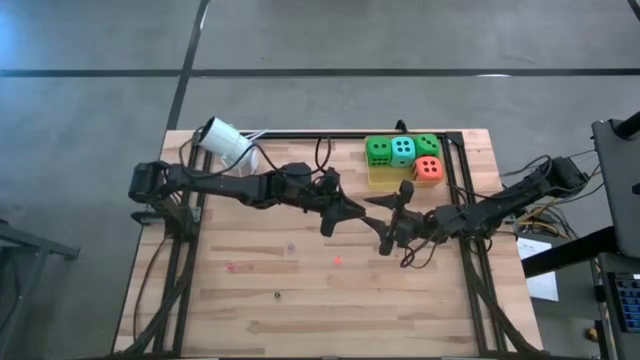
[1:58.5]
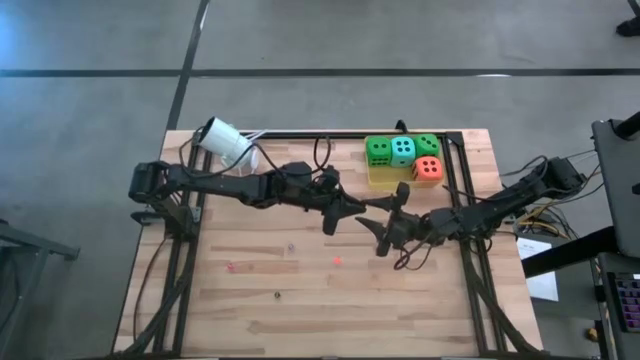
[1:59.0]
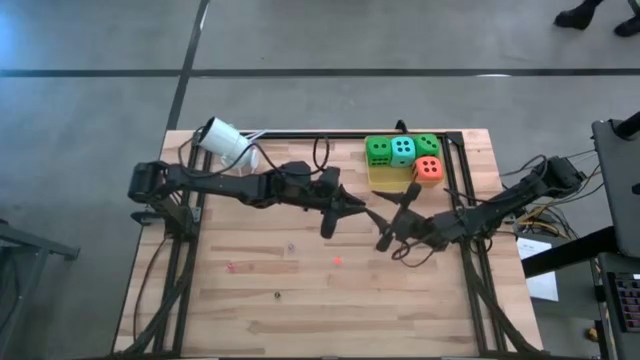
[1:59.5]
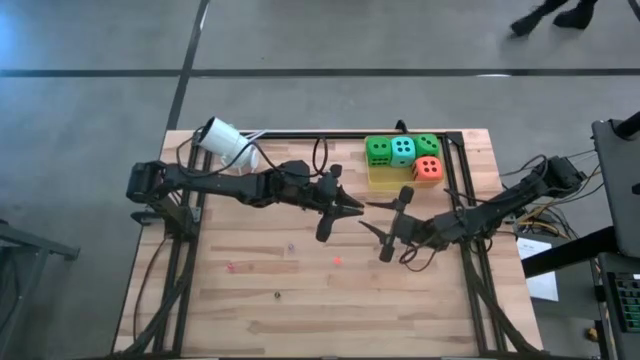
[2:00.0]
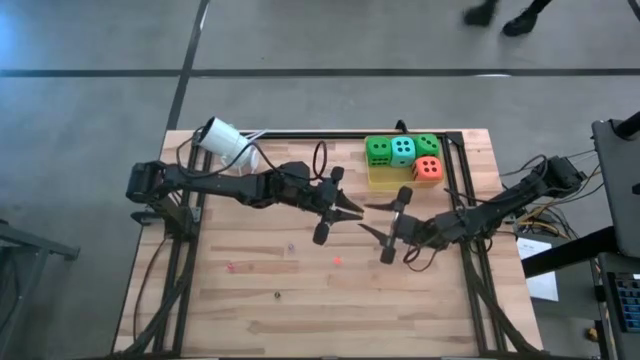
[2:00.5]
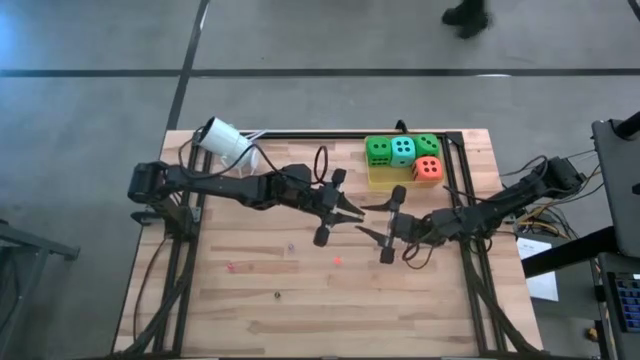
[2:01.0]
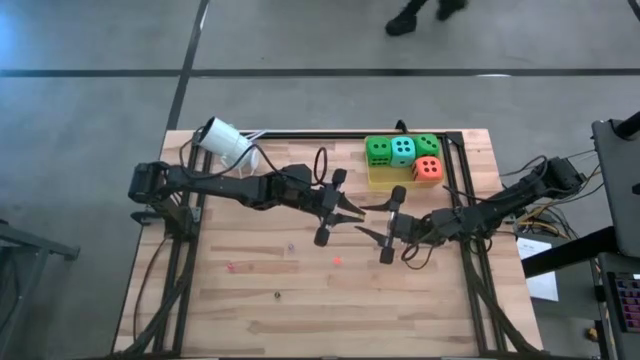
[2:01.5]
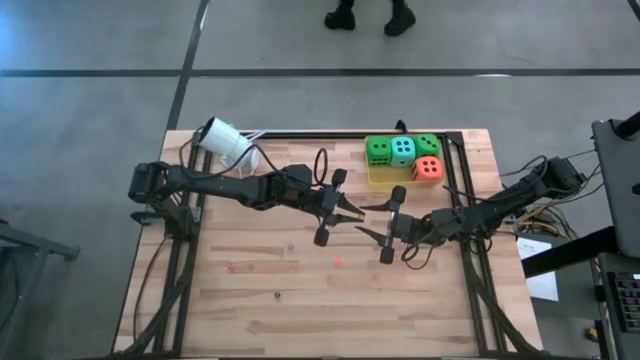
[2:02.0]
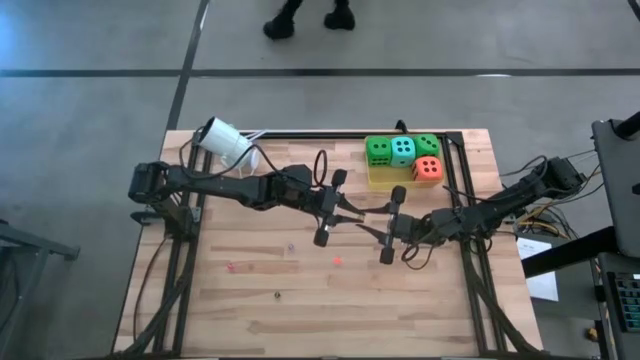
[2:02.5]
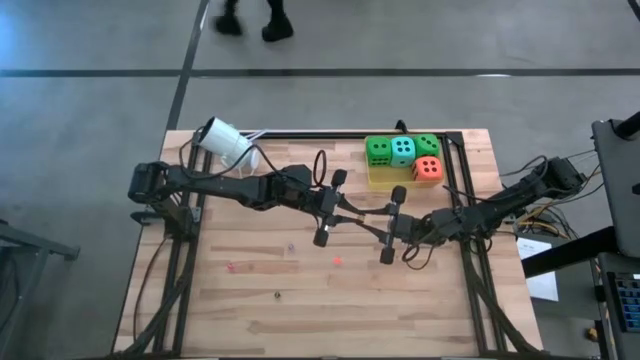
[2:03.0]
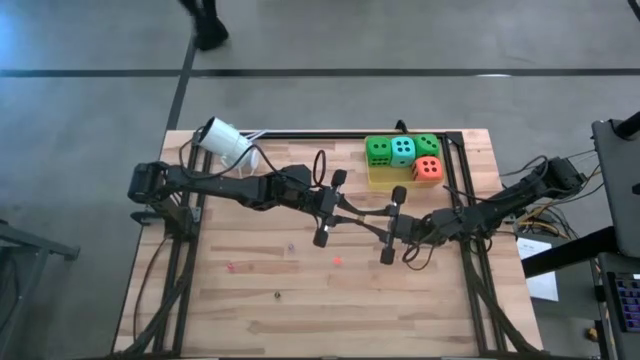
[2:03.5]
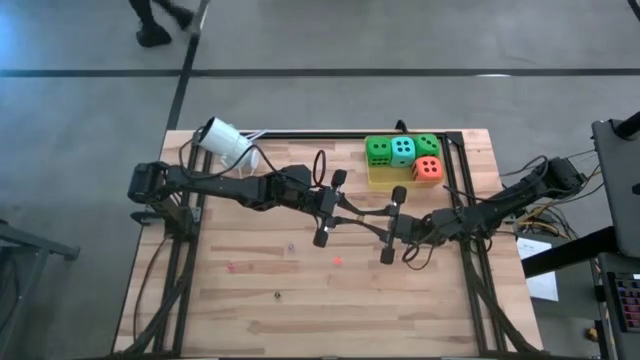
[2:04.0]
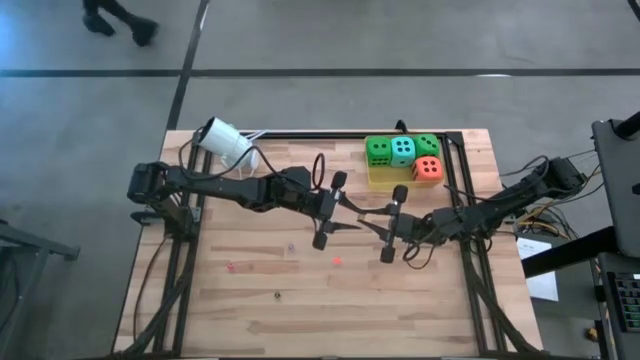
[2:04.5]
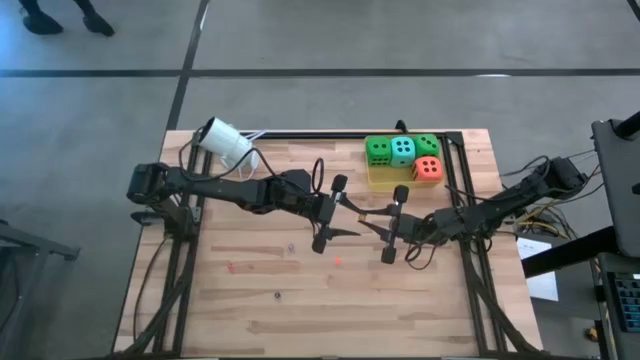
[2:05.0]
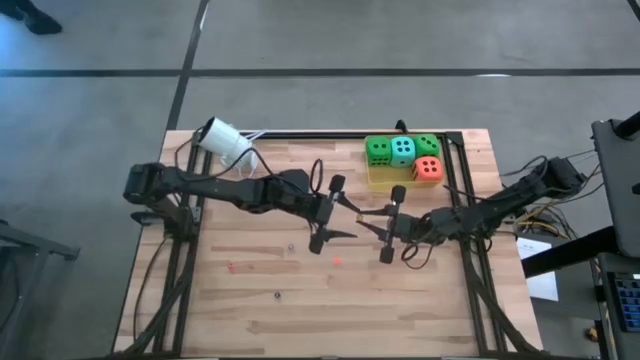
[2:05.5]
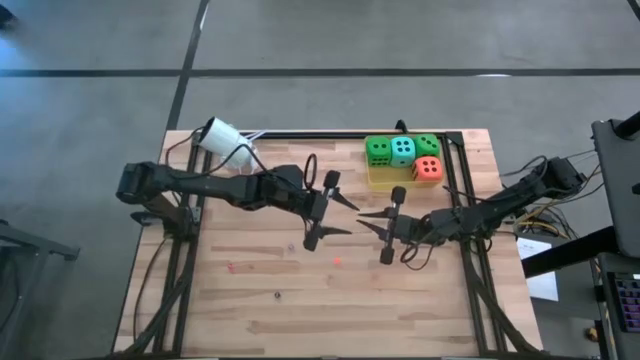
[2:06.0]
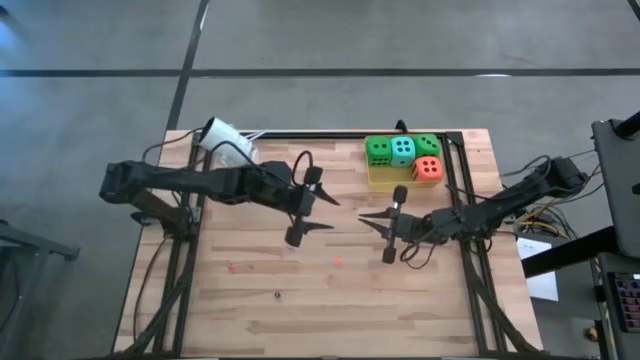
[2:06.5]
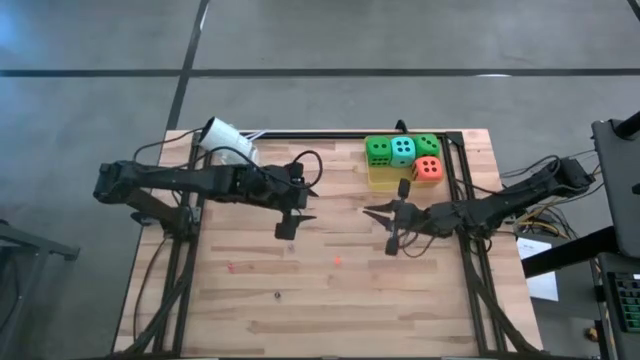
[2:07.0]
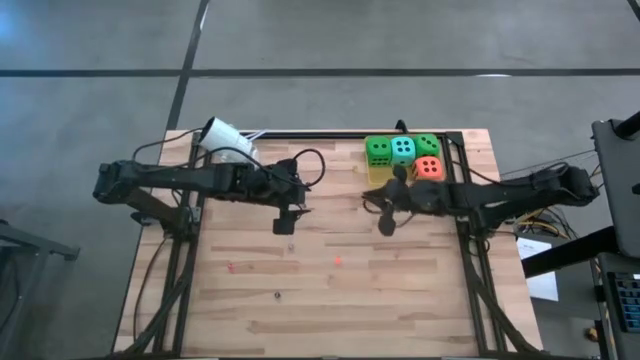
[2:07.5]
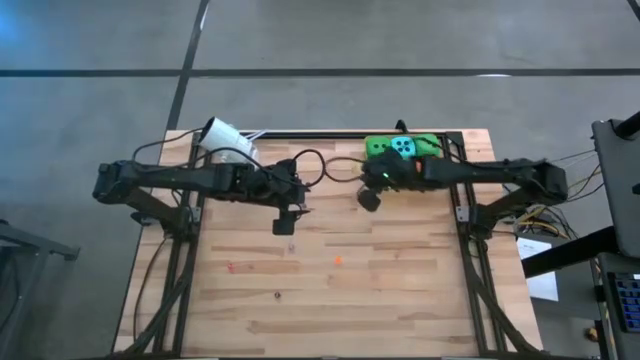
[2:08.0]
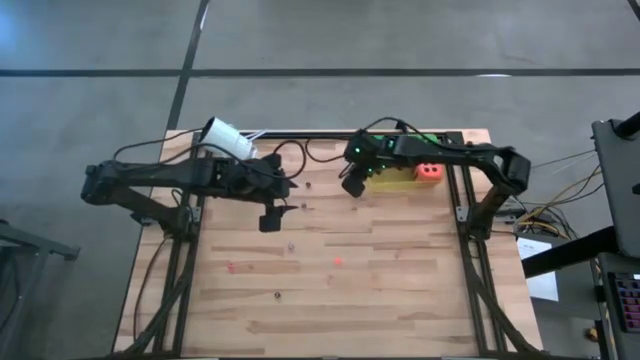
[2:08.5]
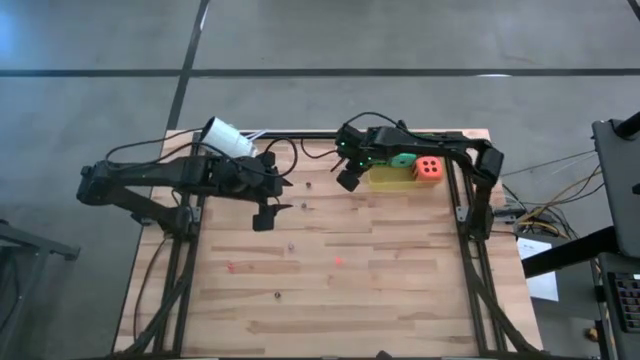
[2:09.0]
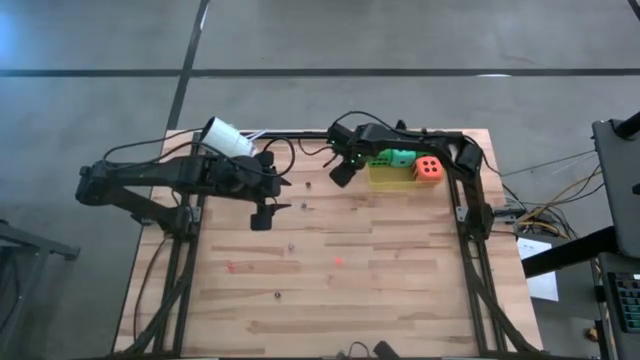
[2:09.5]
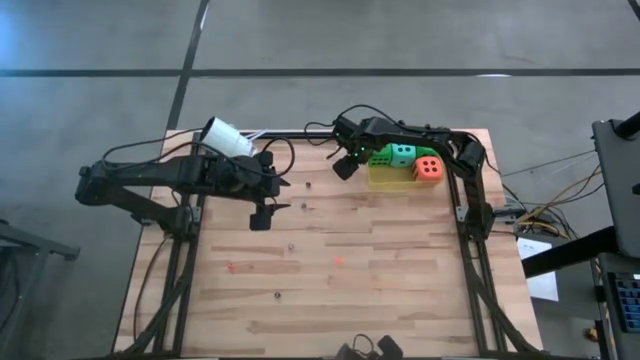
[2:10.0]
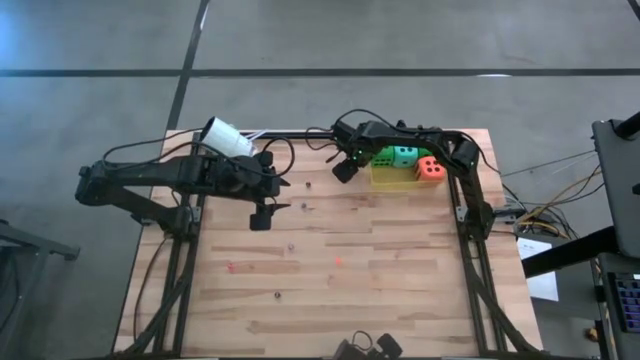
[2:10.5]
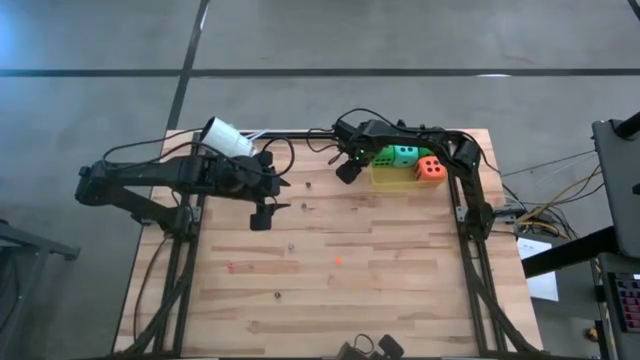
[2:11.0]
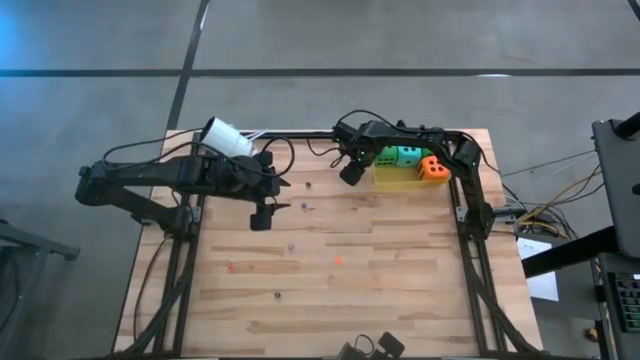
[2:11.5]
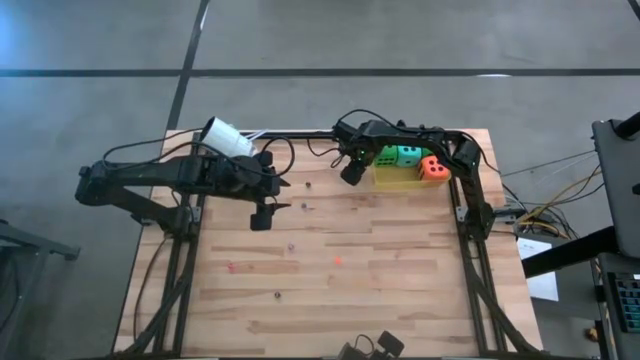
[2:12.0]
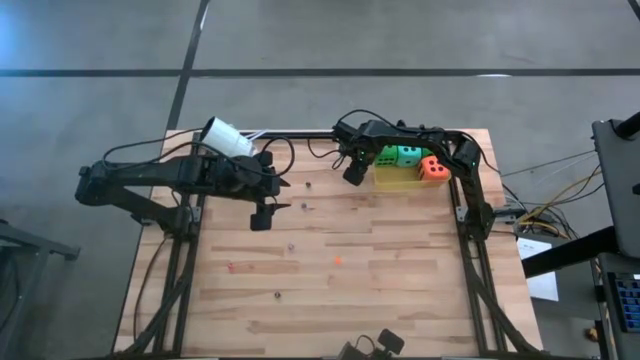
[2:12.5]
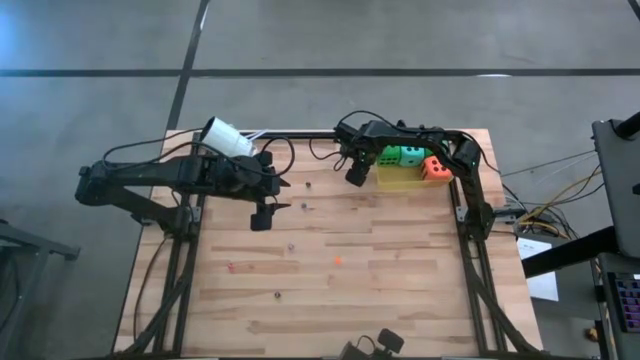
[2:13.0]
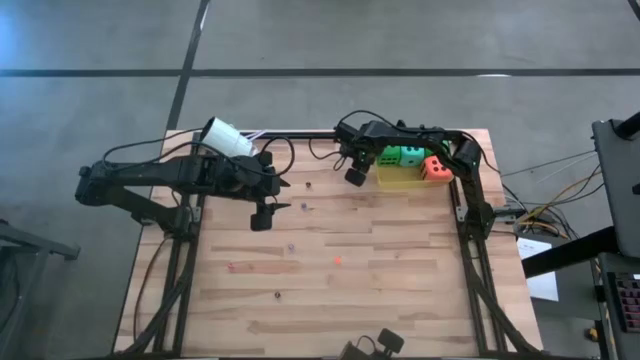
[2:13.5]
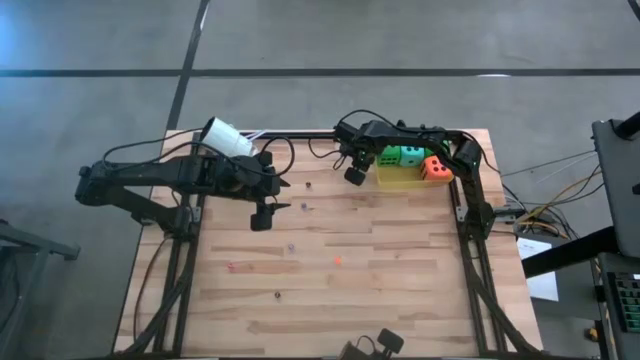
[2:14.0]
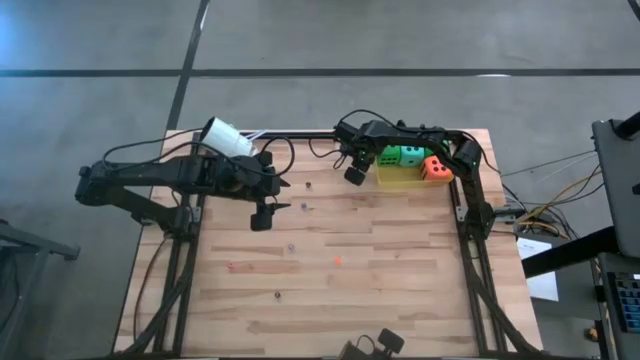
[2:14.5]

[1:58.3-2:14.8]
Task: Pick & Place Dice
Put the small yellow dice into the yellow bin

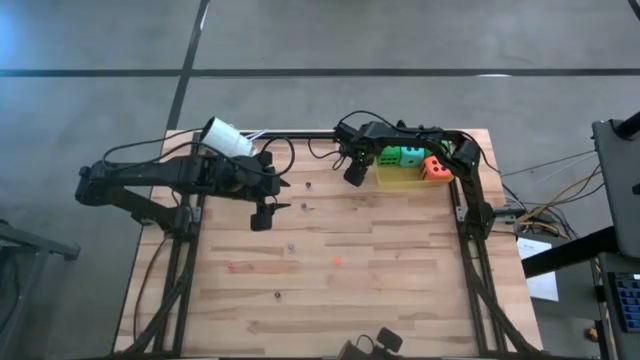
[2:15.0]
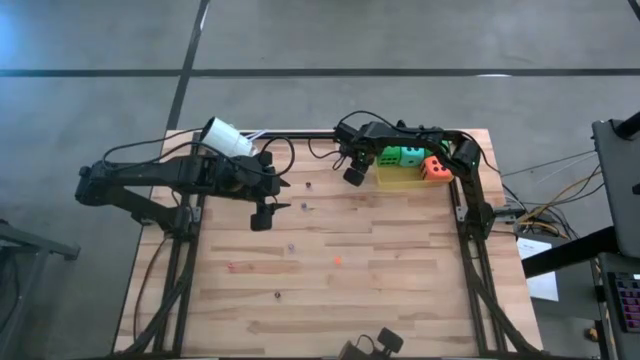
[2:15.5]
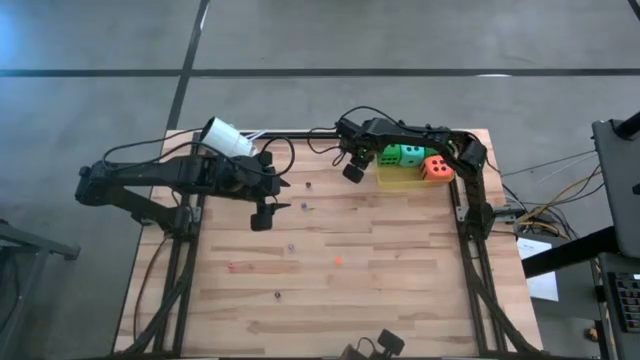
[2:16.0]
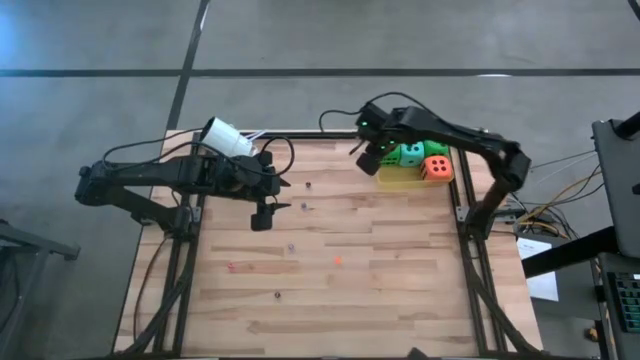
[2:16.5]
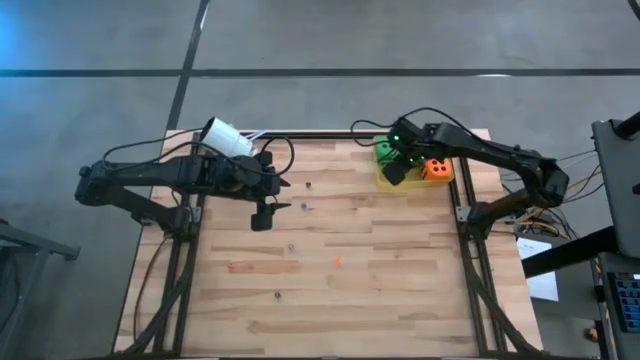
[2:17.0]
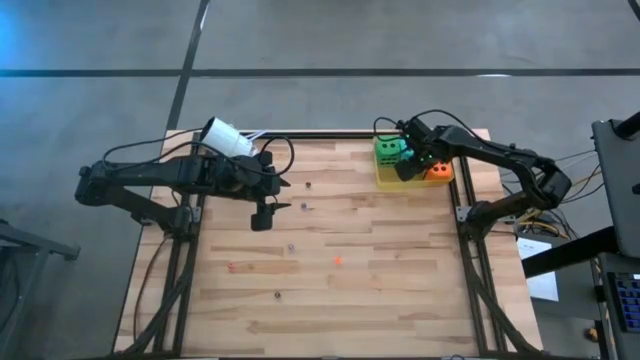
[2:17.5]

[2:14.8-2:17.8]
Put the small yellow dice into the yellow bin

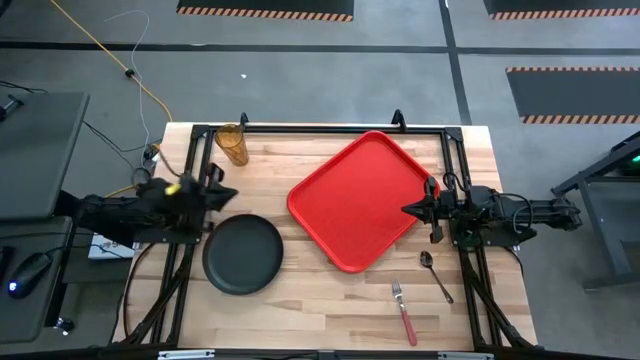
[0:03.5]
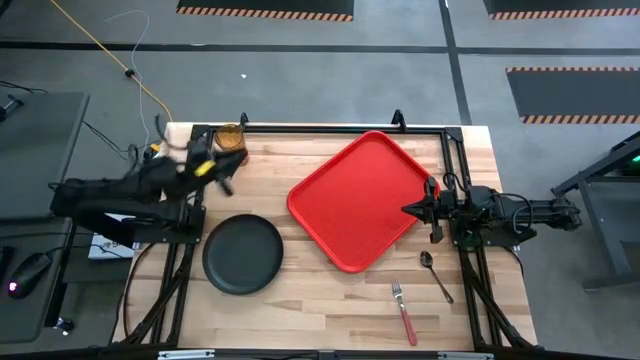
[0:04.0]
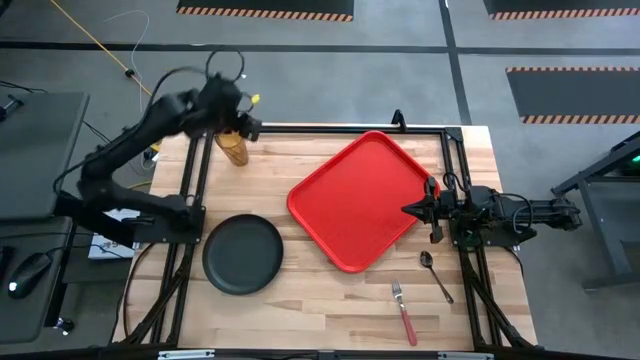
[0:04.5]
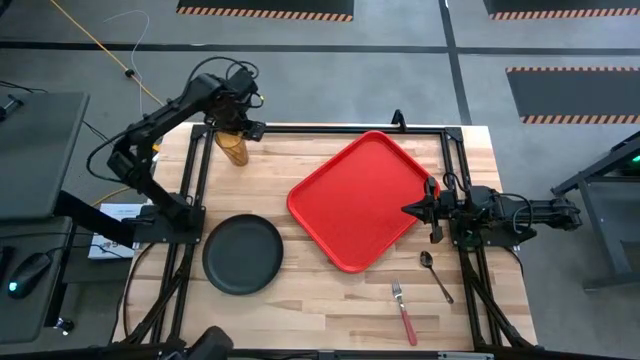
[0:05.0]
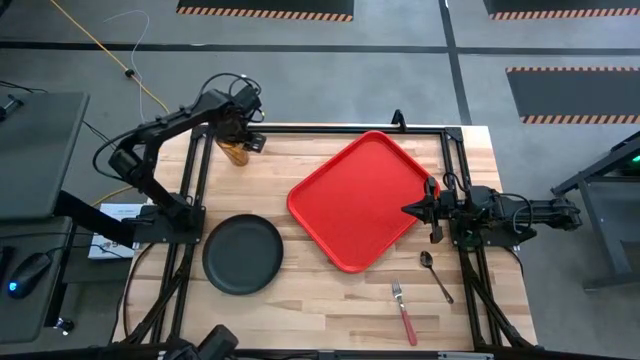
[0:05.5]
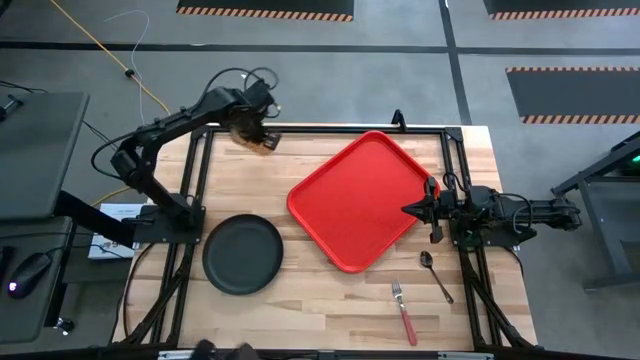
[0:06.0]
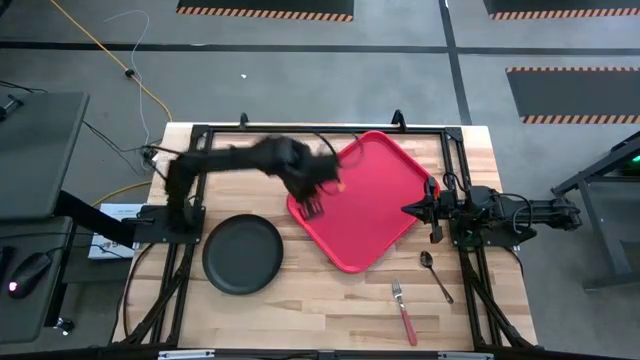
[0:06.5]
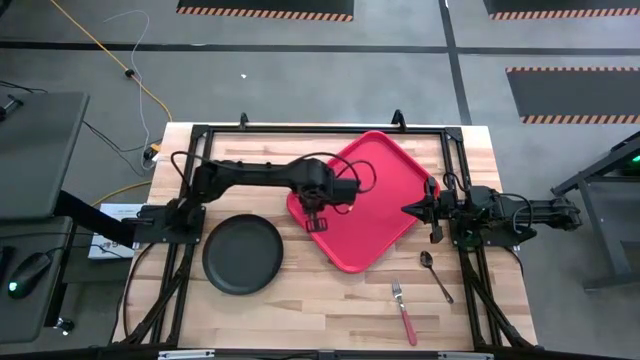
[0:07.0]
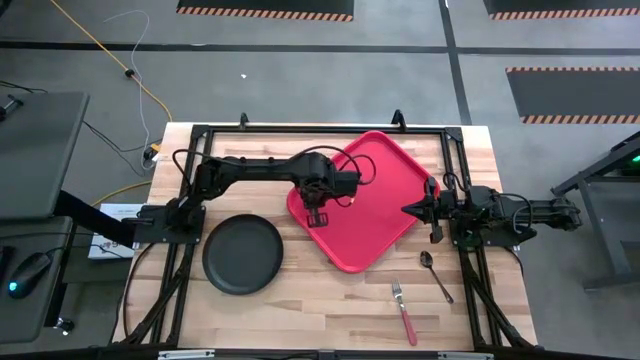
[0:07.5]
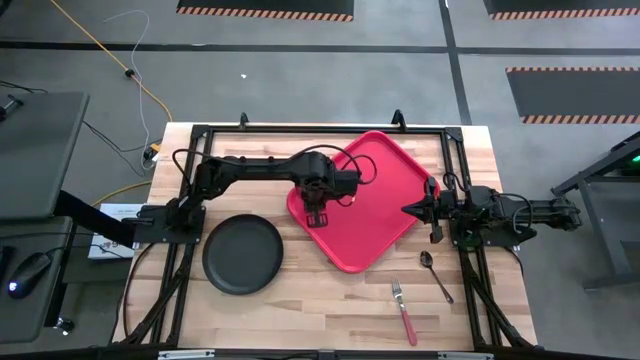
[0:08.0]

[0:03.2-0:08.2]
Task: Pick and place plate/cup/fork/spoon on tray
Put the brown cup on the orange serving tray
